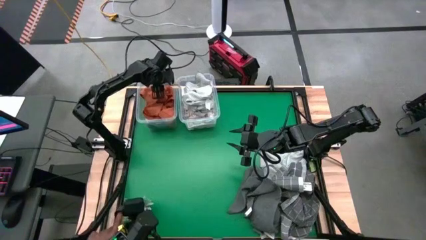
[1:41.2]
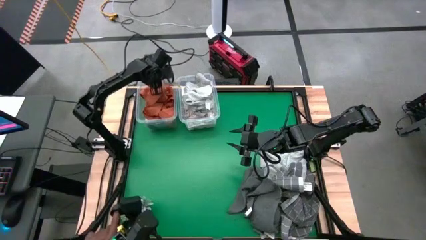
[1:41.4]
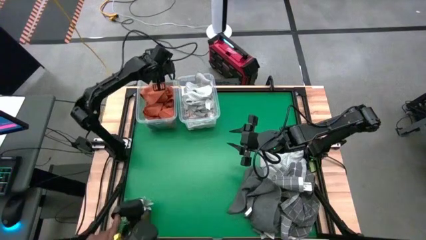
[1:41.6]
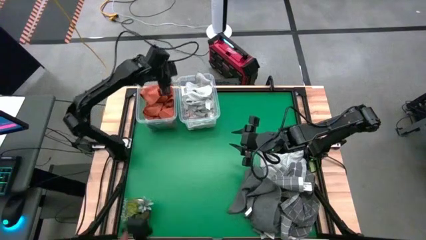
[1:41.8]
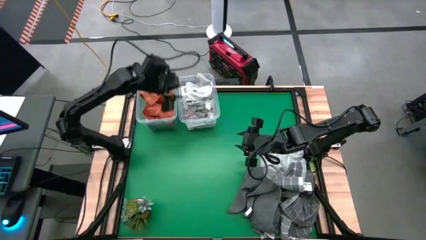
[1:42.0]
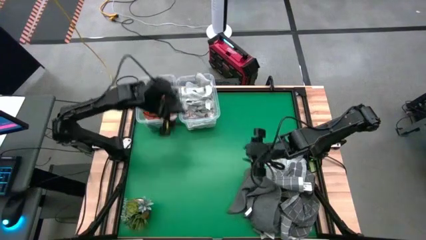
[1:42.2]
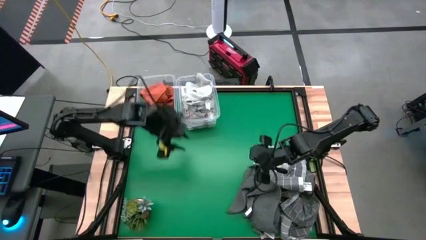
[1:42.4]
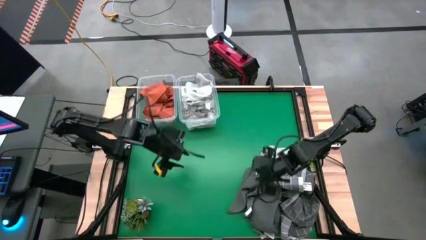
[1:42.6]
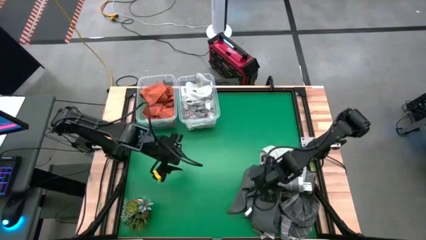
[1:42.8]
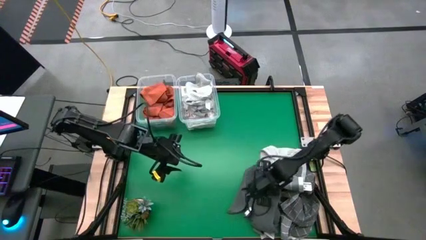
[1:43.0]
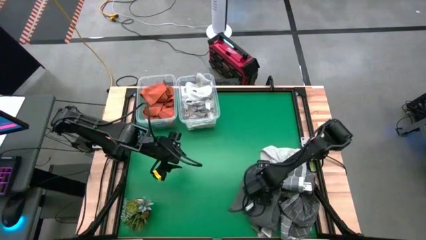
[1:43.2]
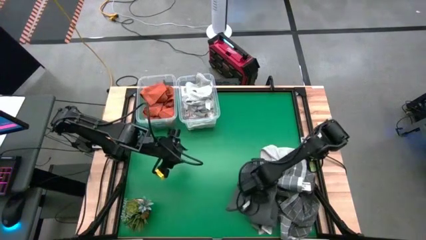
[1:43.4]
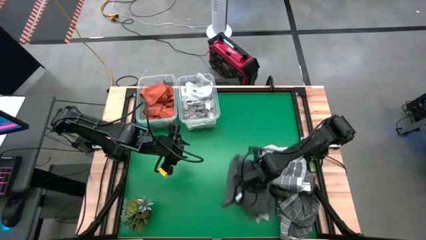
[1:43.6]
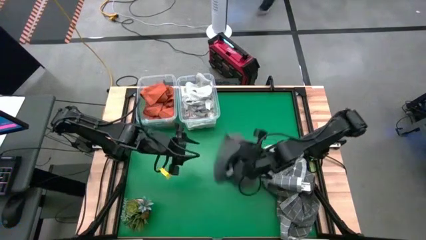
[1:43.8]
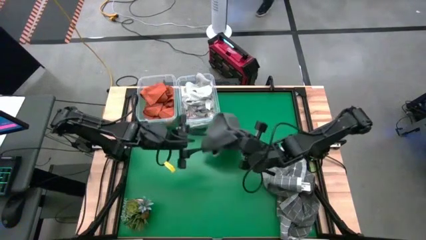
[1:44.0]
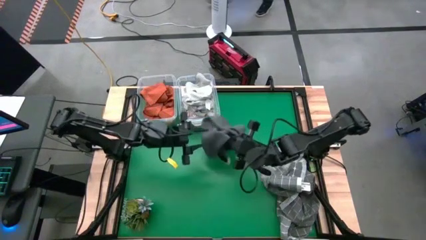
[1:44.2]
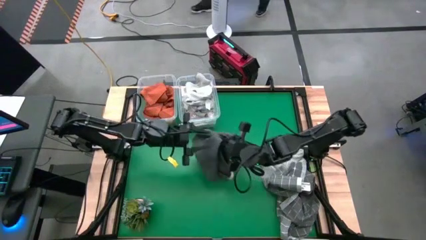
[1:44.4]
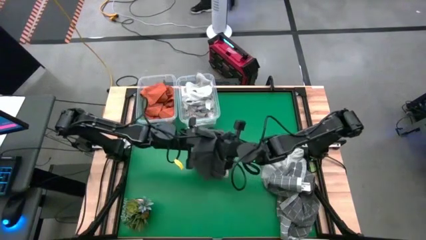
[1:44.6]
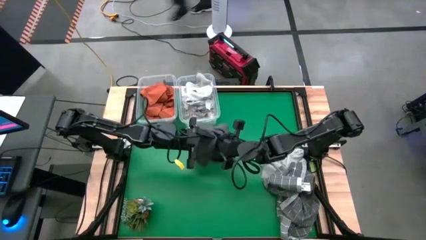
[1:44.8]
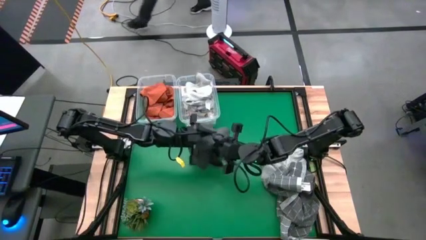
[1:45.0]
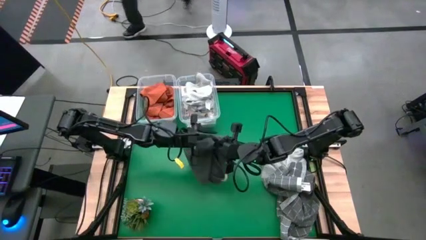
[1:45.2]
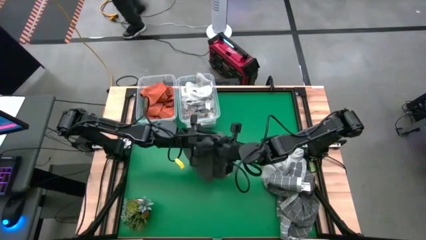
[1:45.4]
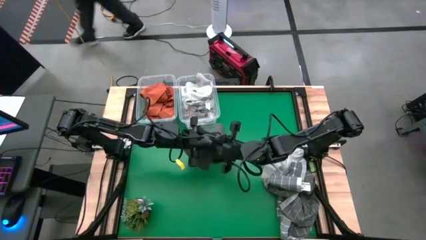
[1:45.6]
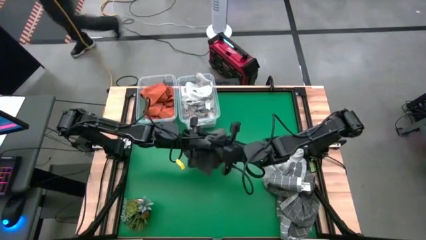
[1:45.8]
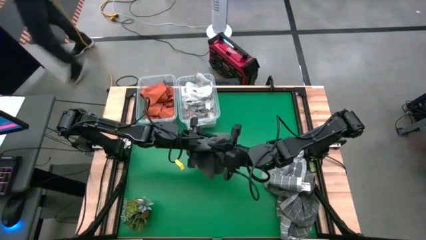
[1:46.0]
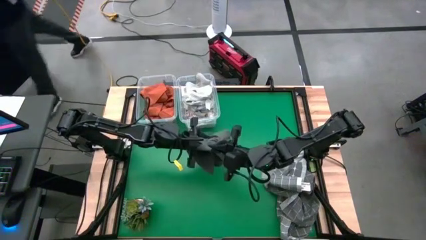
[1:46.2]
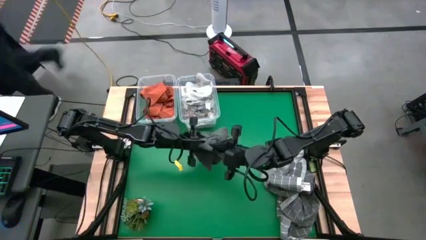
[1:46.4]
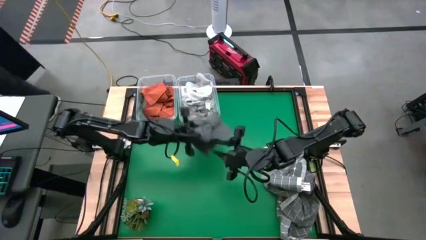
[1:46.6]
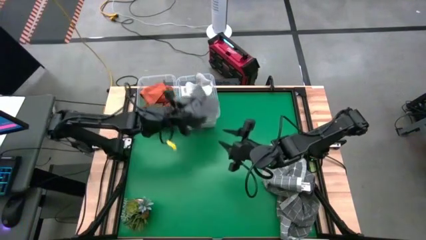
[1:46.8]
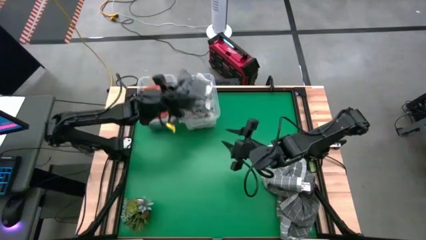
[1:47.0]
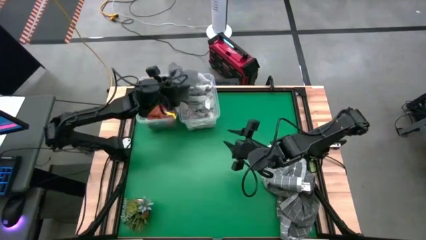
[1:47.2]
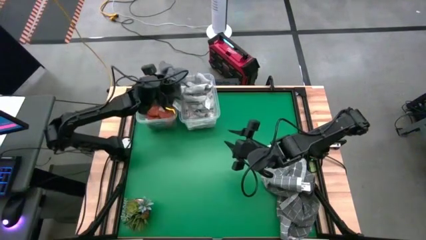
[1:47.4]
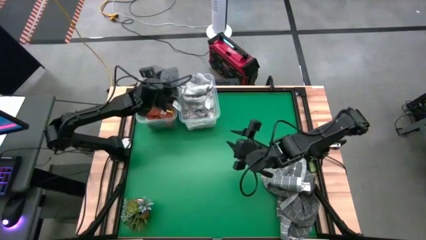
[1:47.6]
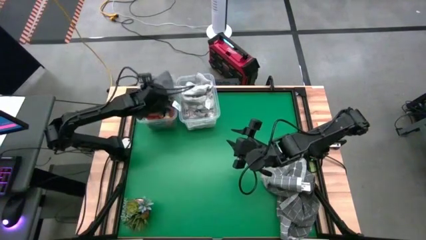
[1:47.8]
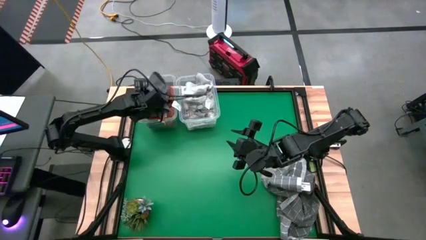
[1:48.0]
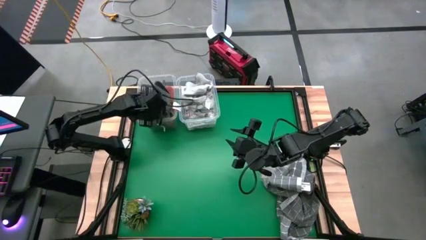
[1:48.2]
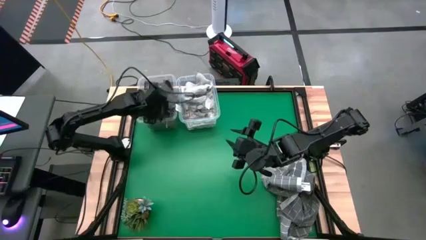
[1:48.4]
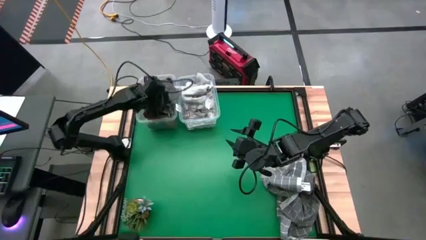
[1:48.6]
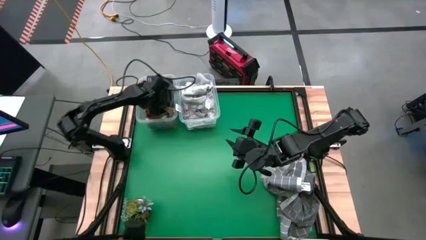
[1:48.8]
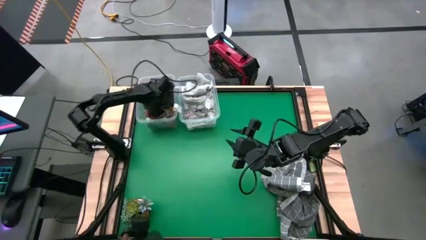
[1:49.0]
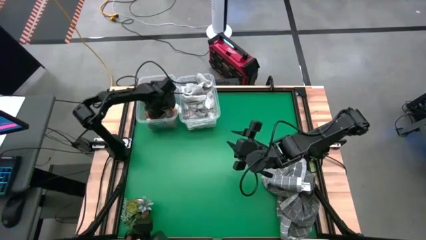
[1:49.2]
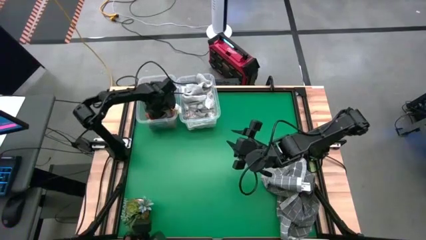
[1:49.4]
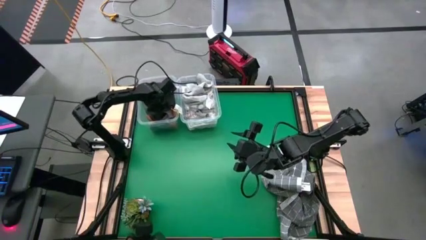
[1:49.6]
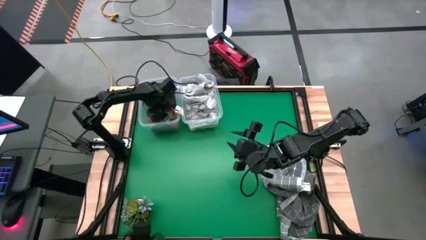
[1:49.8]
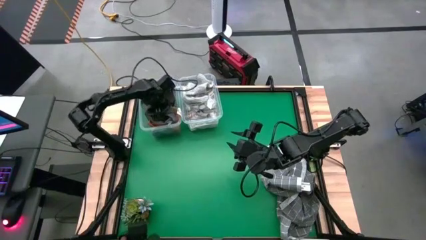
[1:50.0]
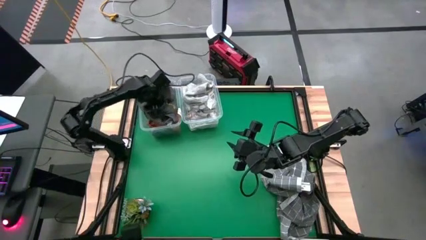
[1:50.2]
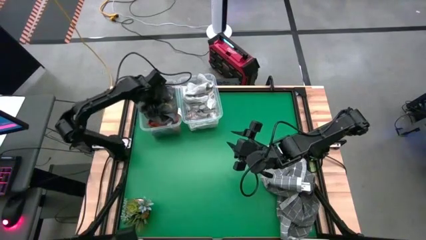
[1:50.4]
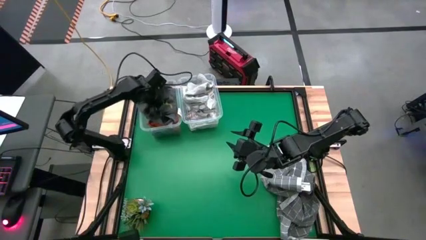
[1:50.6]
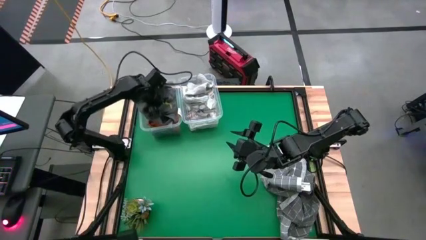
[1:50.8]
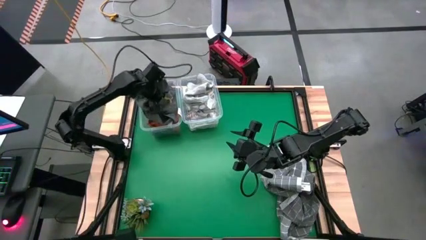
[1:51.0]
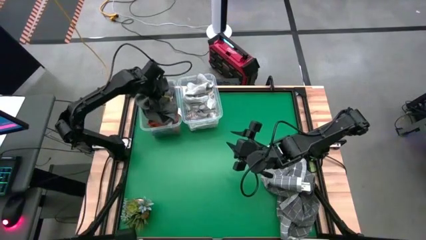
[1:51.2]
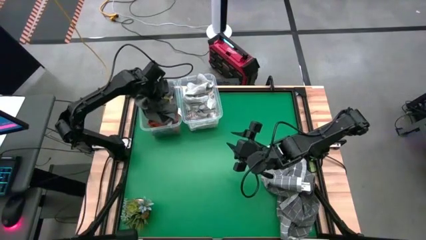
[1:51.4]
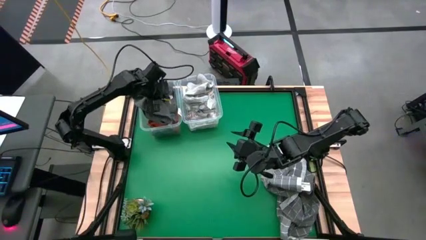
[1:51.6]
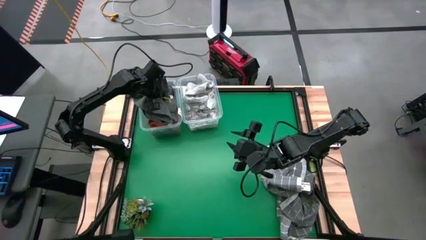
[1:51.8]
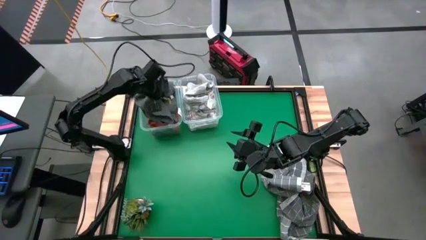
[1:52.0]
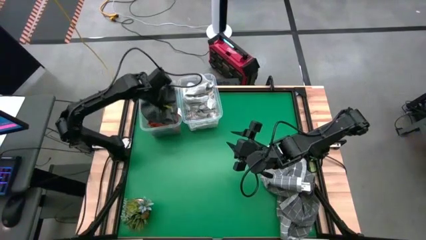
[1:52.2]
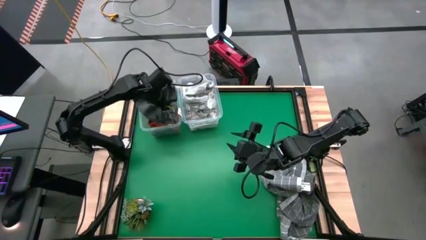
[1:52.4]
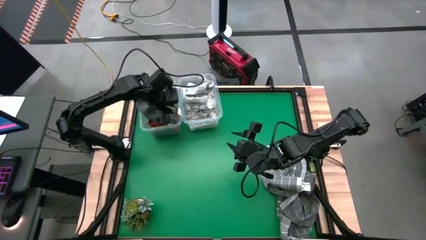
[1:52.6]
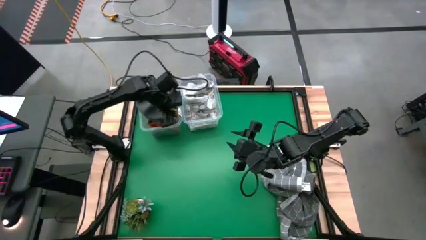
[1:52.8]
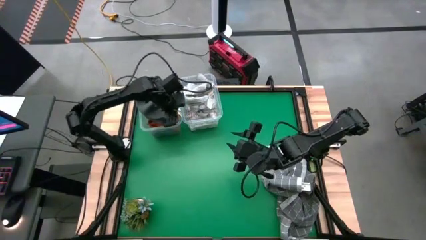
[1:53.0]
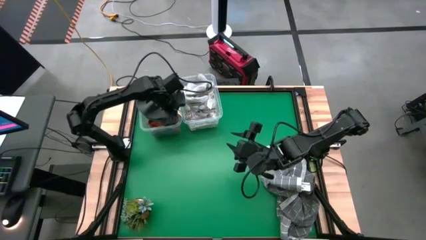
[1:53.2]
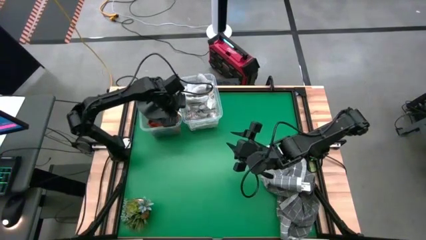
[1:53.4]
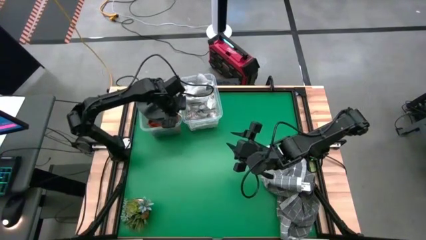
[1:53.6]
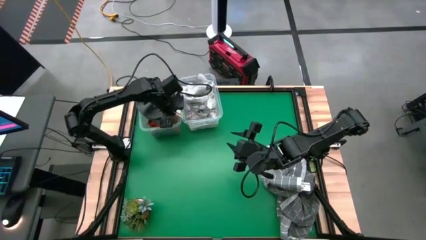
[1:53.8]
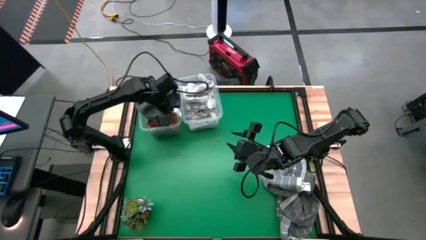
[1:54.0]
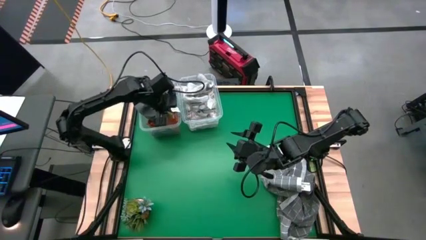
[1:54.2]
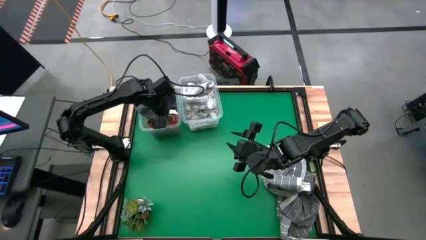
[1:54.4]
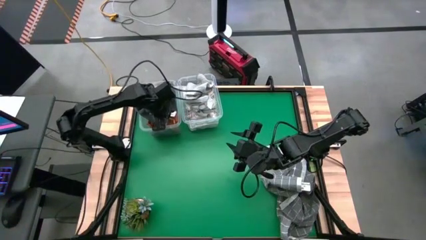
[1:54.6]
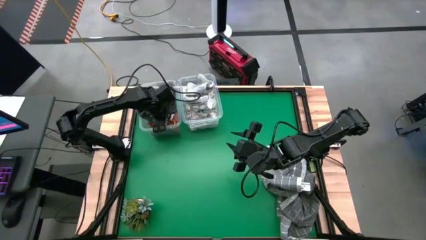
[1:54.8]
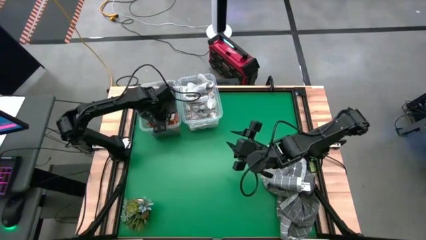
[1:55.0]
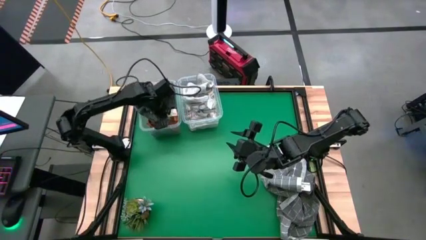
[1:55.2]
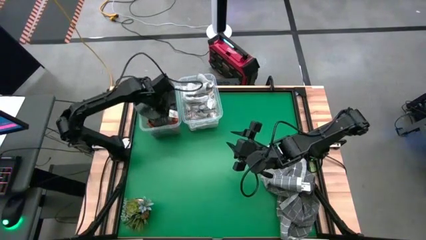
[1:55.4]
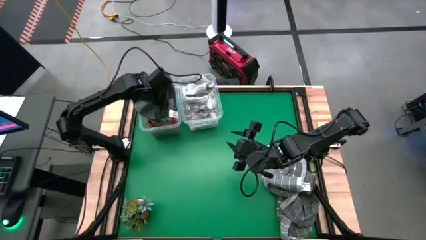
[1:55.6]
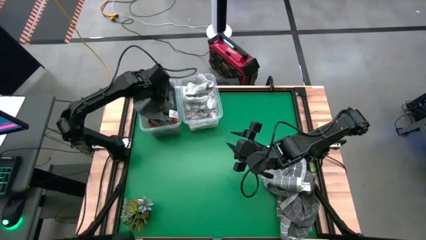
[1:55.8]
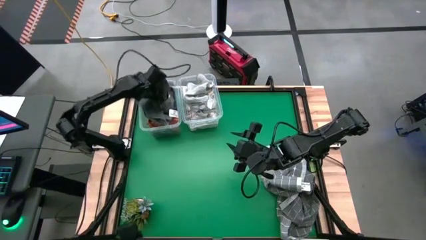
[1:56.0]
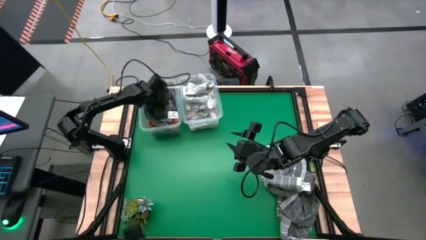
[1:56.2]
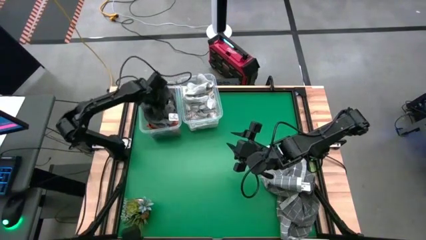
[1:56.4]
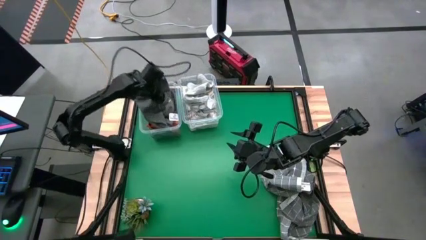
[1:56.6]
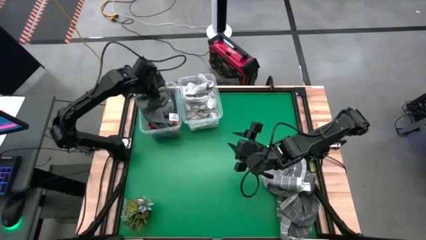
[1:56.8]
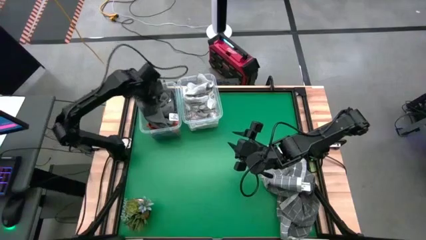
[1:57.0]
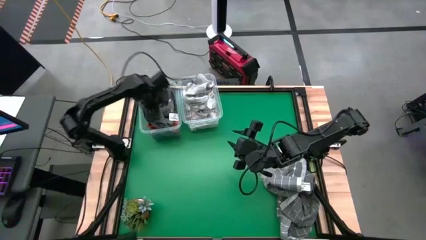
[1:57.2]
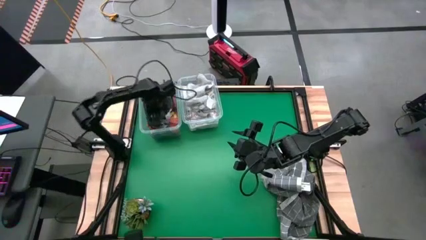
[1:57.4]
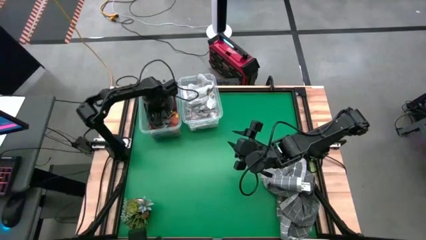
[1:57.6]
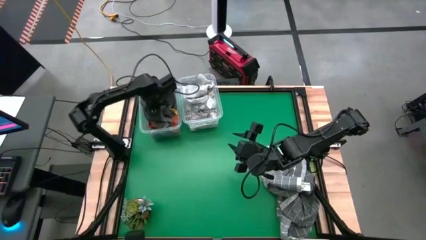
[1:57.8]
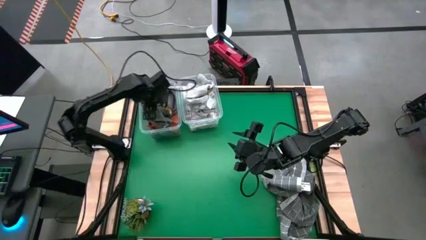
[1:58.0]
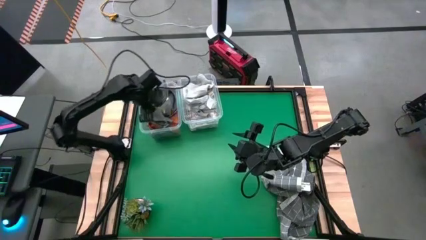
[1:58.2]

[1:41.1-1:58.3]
Task: Sort towels by color in basket
Put the gray towel into the left transparent bin

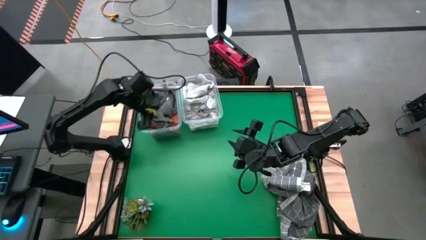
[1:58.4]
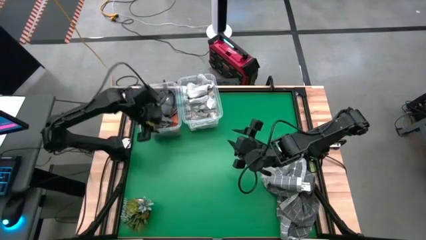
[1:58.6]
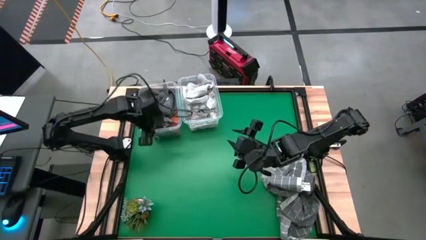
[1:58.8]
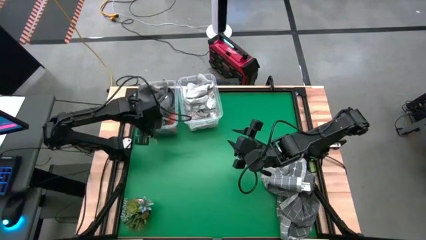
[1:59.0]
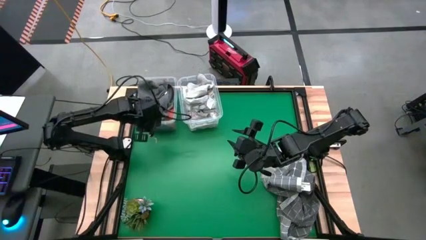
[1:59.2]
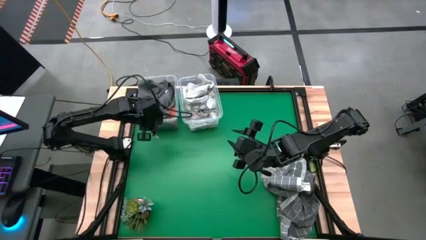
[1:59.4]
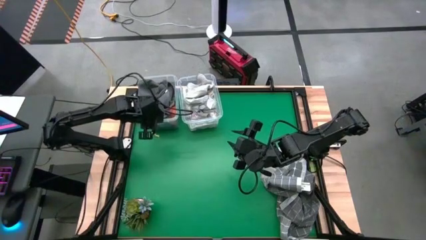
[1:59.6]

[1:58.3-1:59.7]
Adjust the left transparent bin
